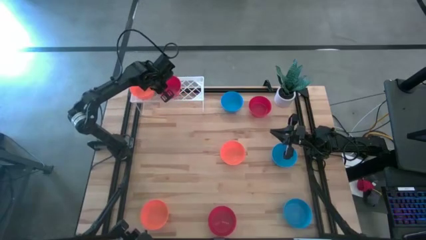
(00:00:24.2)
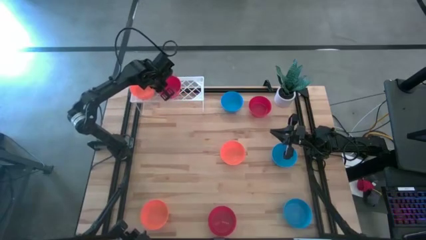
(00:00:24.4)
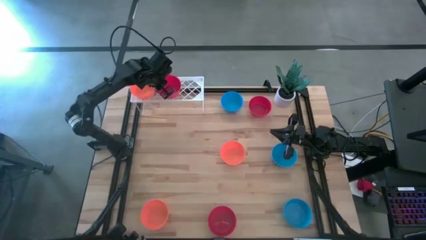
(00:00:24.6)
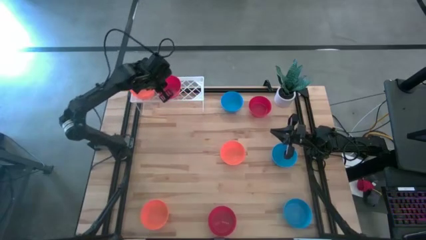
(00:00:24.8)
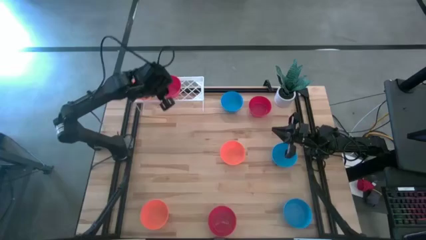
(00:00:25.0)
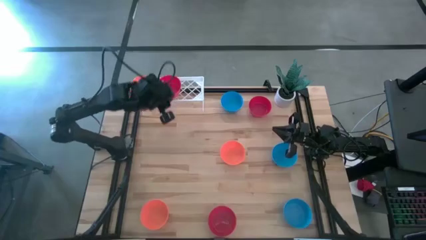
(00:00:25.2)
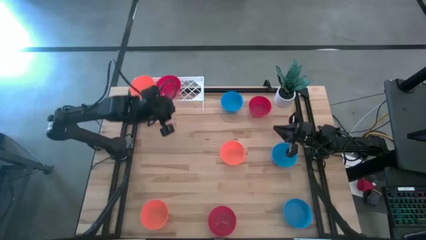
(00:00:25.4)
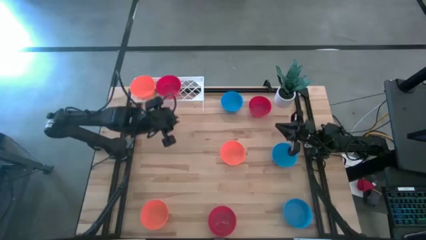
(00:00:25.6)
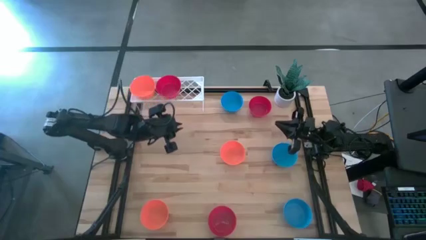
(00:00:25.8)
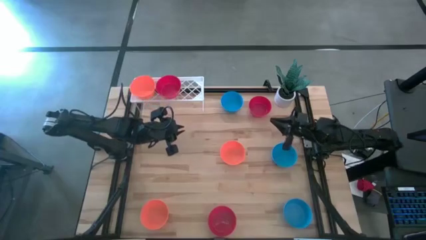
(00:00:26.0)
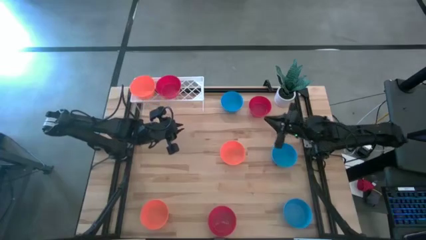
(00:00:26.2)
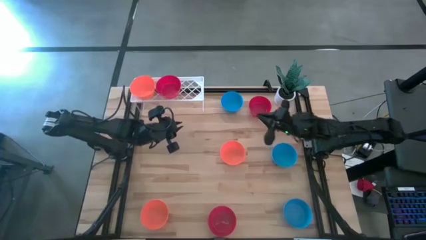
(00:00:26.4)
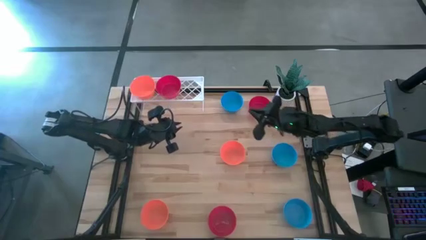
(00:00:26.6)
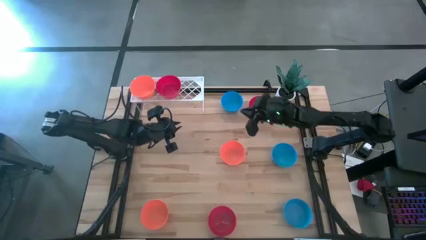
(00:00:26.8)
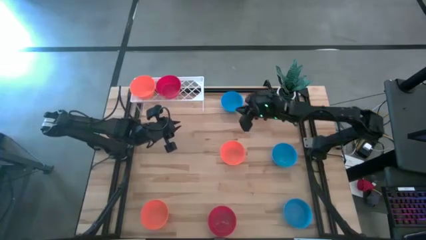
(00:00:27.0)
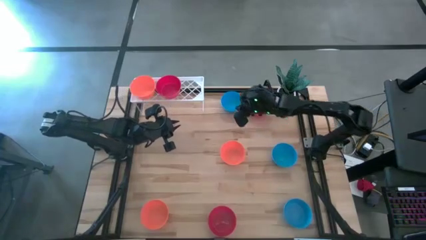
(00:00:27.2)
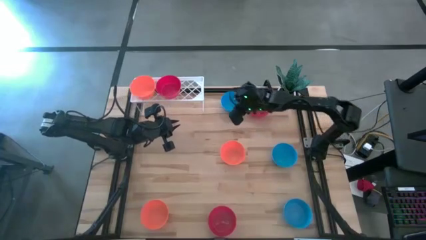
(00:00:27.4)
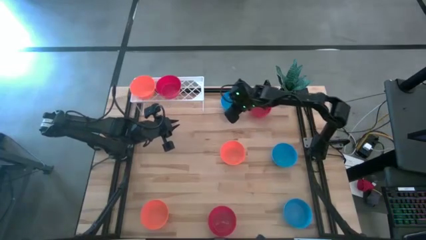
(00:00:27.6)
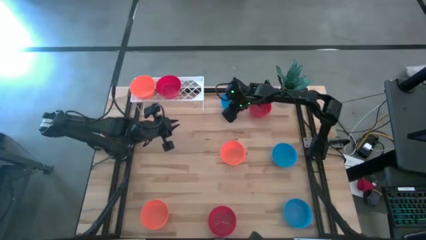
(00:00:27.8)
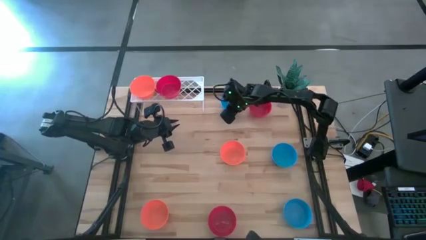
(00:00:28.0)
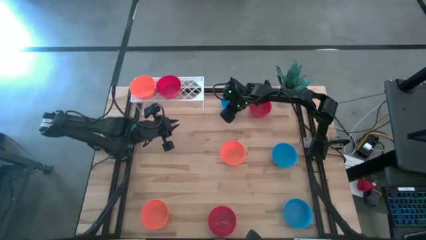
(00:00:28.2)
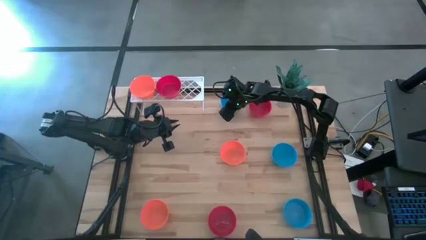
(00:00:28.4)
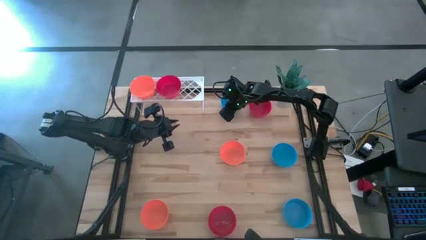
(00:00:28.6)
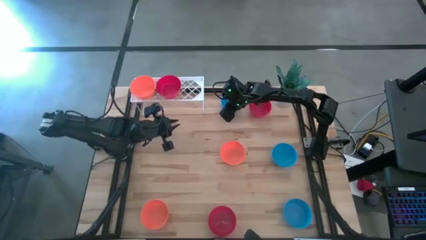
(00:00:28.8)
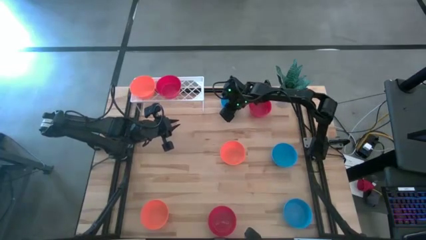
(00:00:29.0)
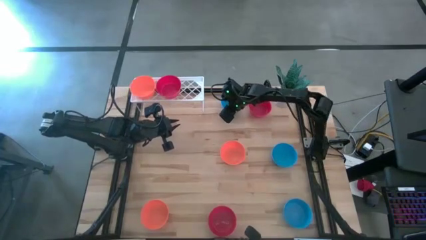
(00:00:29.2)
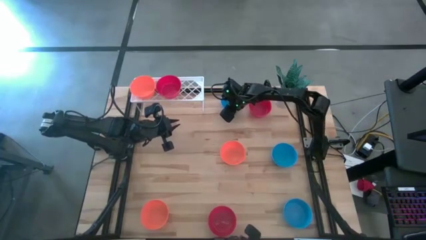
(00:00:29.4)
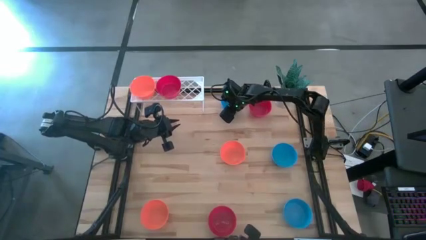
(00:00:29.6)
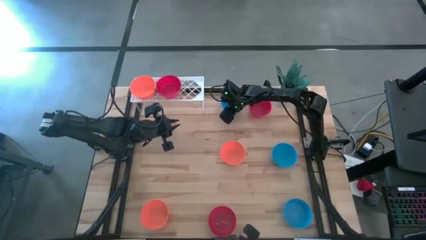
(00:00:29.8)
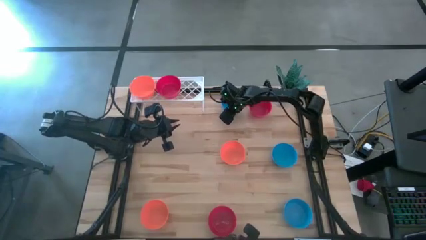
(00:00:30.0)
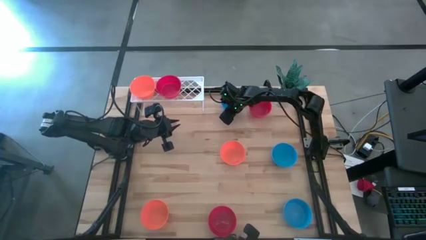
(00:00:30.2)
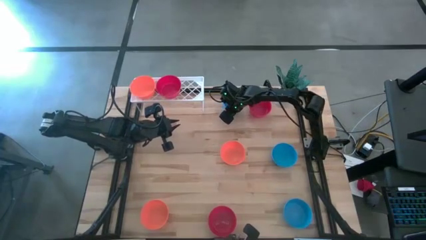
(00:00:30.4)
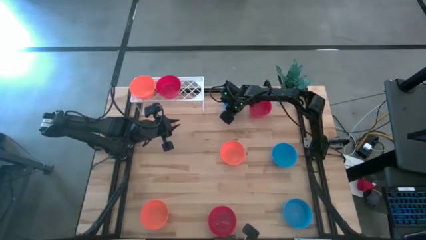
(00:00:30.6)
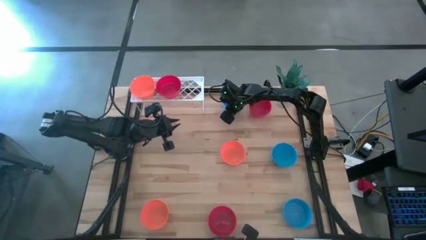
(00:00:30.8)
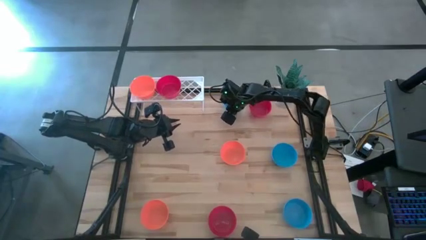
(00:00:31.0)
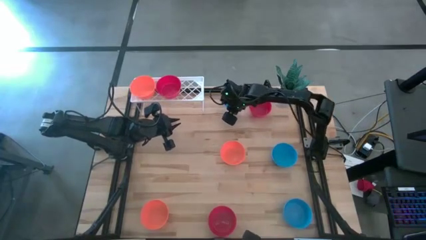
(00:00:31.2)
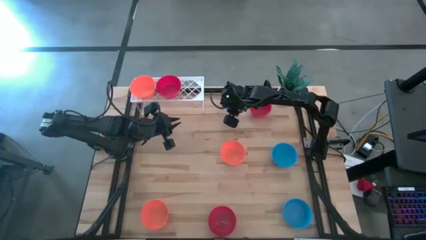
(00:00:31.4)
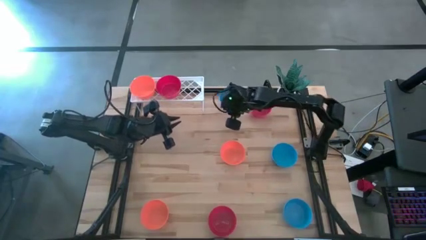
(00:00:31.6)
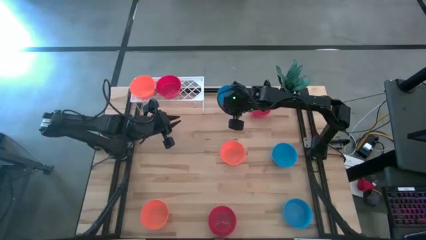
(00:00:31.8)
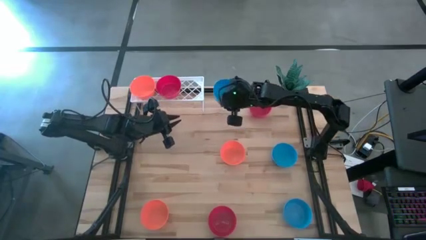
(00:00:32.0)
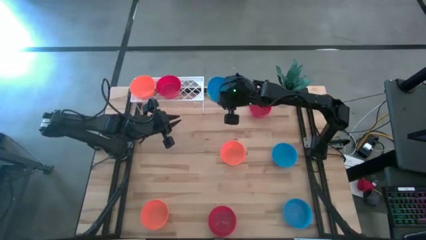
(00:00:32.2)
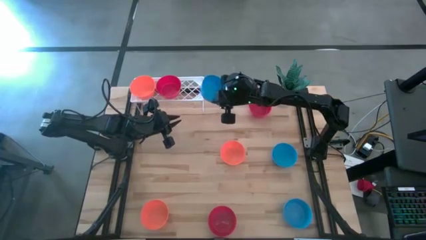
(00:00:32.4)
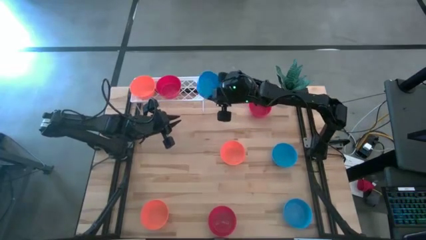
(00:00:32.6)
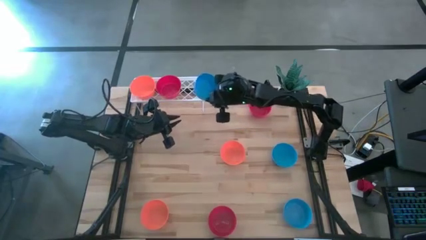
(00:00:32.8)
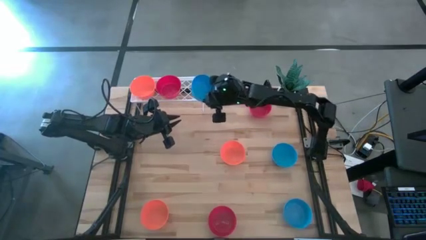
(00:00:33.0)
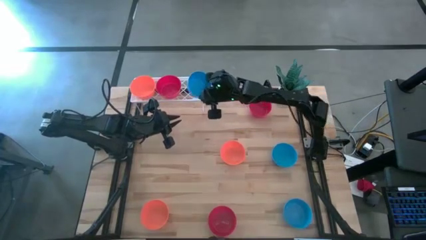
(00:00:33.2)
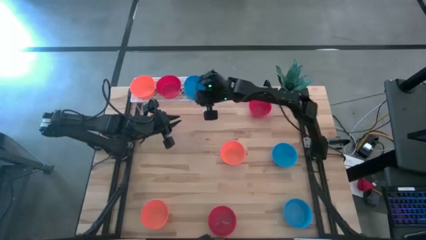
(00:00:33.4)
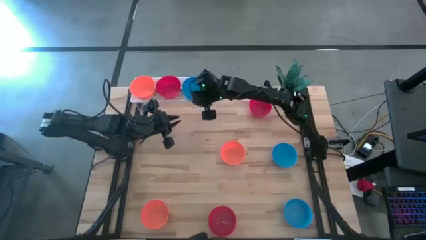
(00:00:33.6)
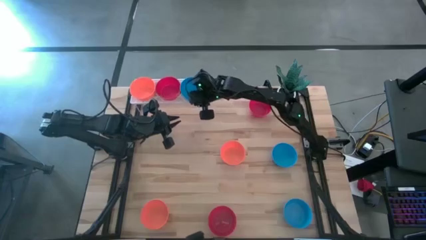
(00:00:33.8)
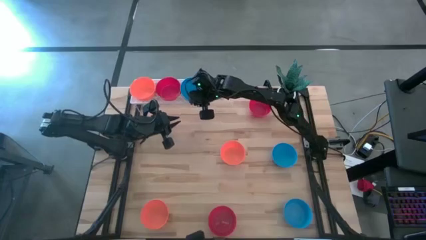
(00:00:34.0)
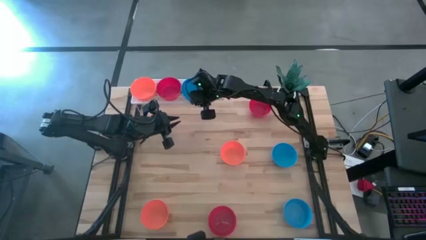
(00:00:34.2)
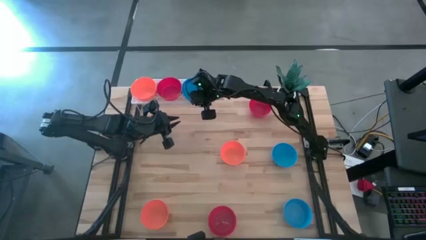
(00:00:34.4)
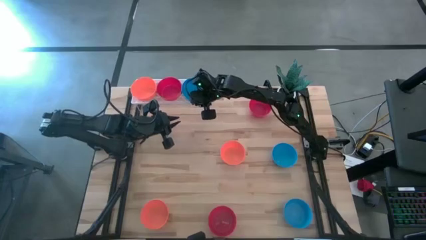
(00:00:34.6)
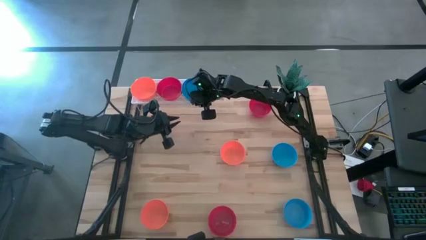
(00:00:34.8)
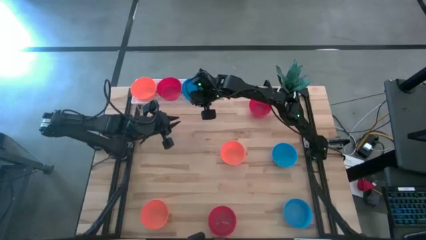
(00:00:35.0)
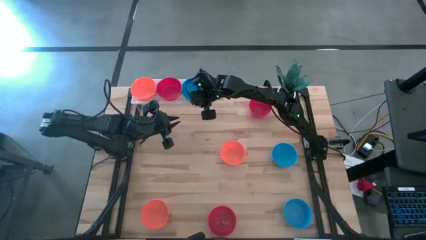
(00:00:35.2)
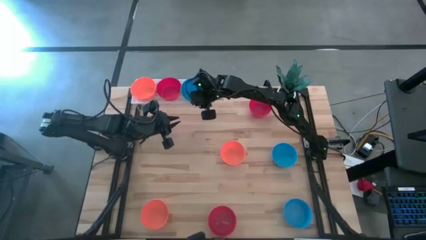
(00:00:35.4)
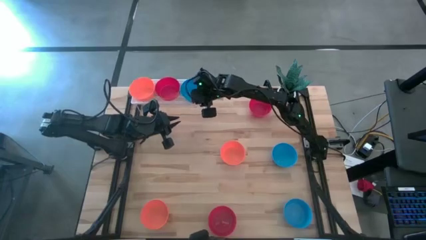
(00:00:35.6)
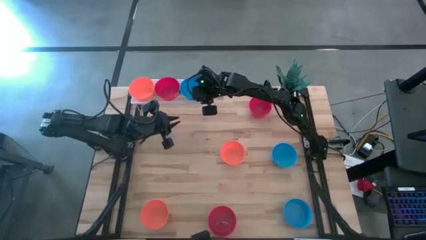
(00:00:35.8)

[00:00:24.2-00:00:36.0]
Task: Pick & Place Mini bowls
Put the top blue bowl on the shelf

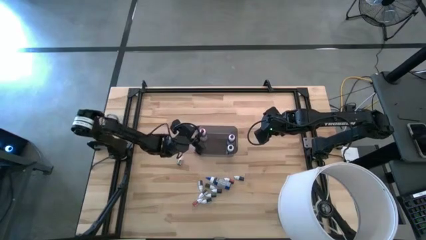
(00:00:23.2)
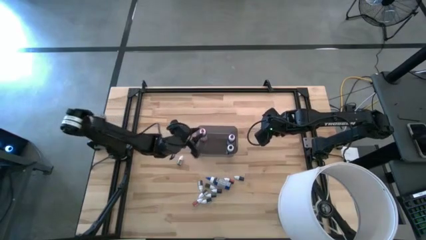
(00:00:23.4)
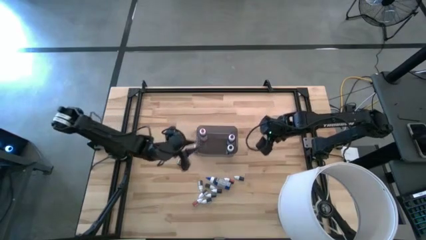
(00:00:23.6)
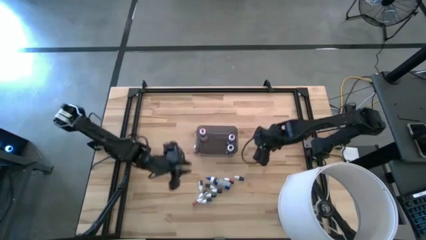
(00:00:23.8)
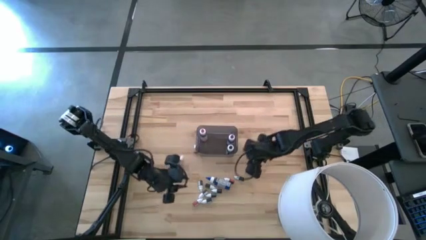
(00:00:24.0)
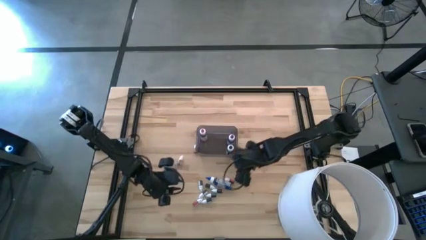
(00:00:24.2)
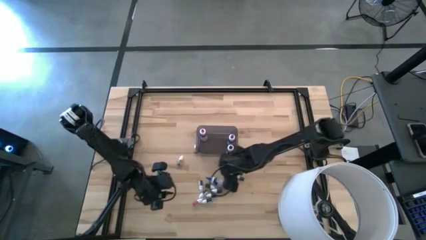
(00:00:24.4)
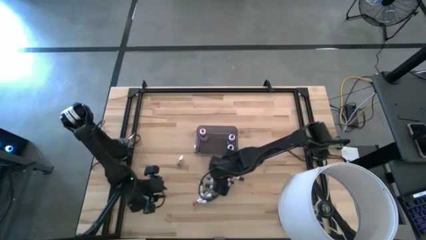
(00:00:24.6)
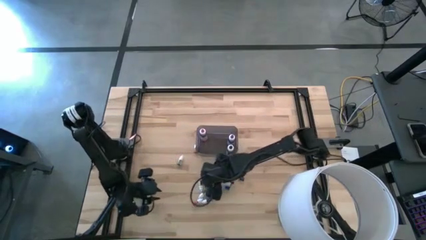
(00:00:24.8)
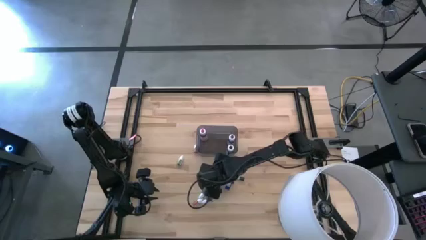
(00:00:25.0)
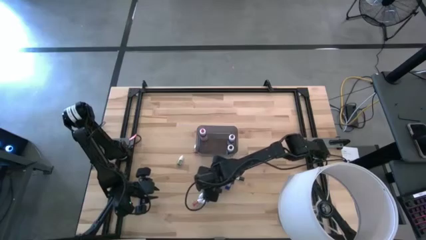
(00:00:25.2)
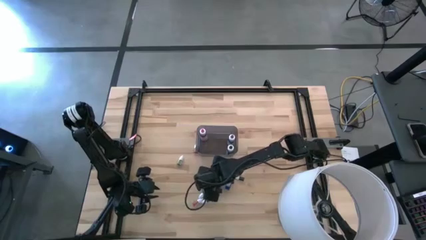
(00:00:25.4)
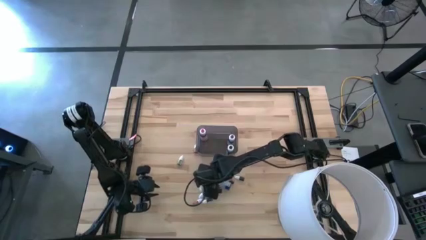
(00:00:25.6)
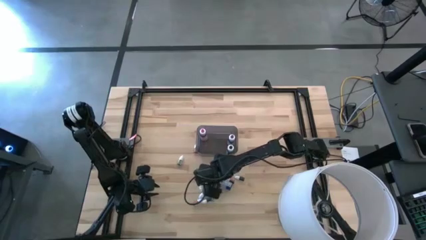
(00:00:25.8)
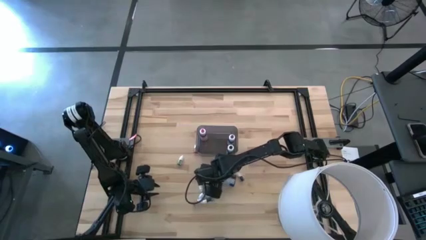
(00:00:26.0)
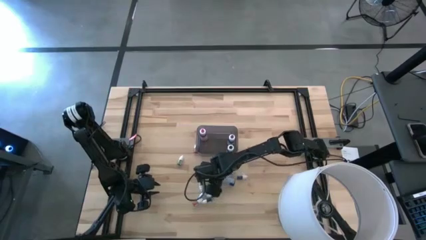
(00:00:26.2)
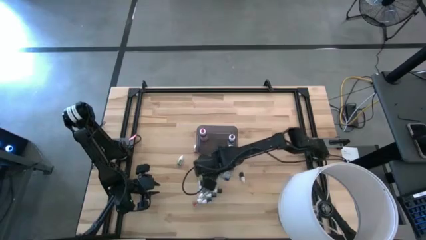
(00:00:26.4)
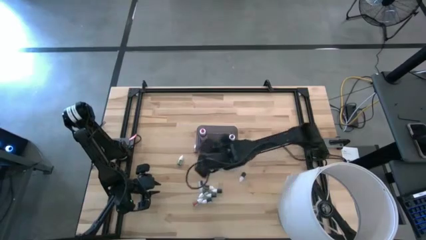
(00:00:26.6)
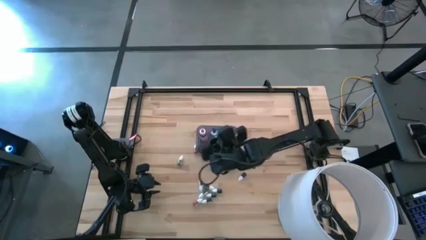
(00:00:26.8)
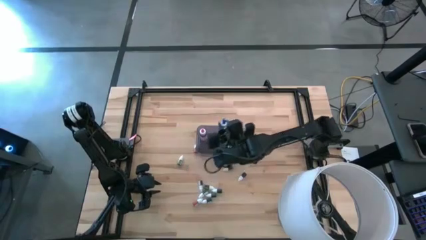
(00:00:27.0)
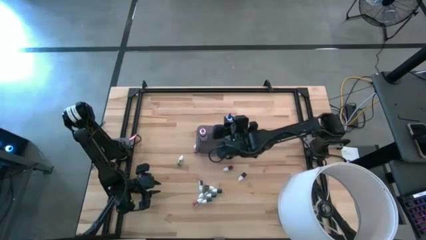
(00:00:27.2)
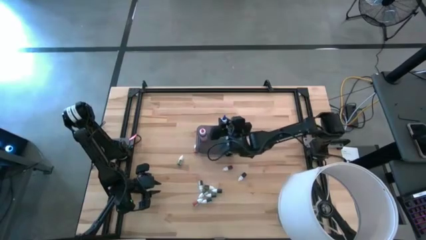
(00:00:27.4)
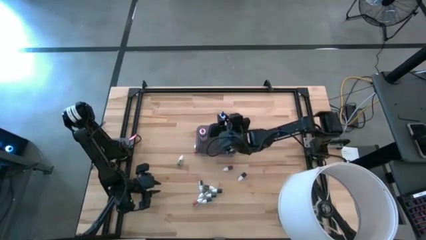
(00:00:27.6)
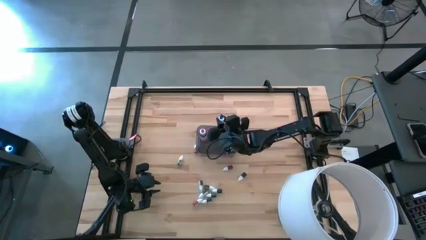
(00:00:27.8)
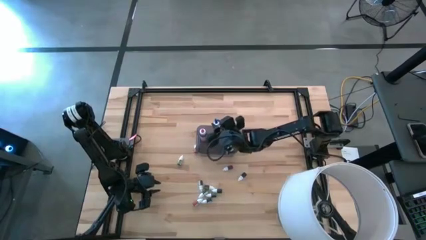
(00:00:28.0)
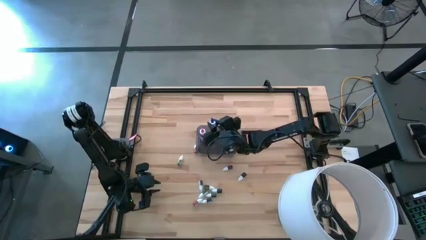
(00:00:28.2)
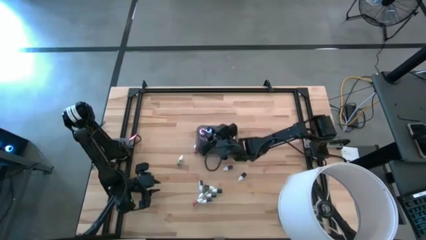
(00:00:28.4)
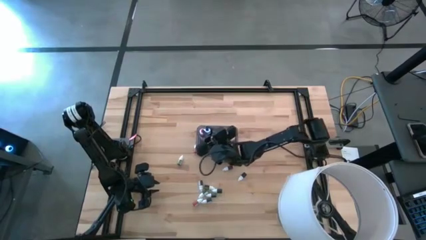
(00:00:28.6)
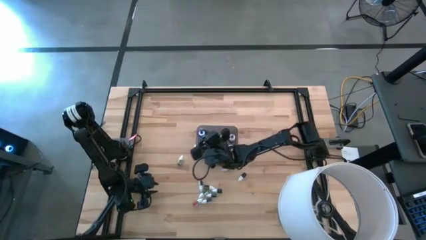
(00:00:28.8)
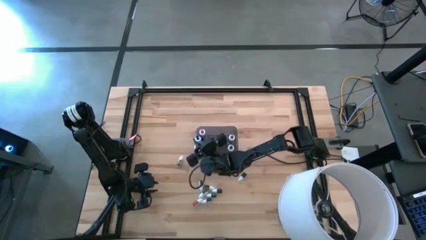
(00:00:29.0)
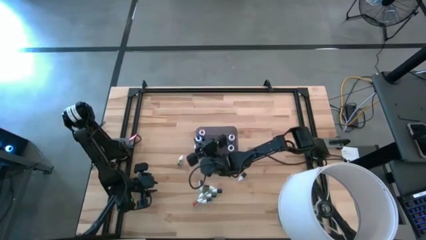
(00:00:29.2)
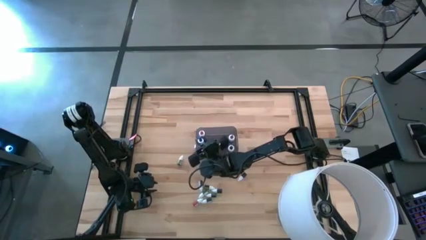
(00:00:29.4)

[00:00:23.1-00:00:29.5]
Task: Pick & Place food coloring
Put the large blue food coloring bottle in the black bin
